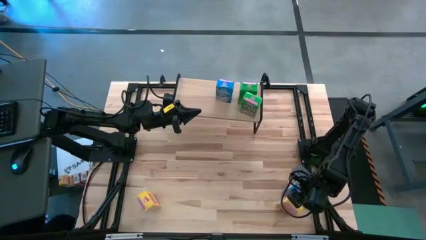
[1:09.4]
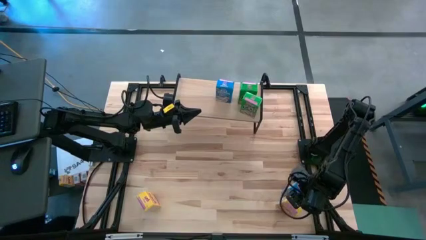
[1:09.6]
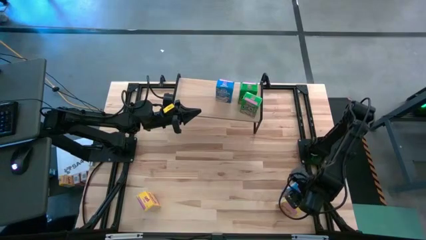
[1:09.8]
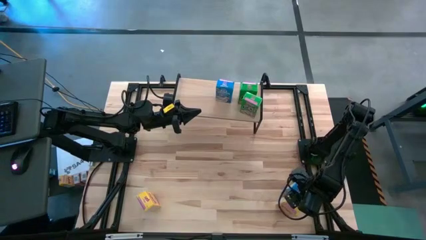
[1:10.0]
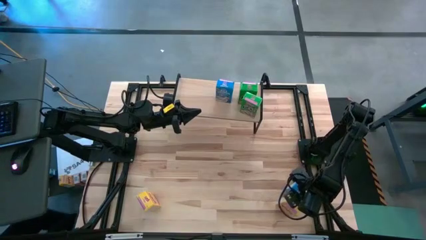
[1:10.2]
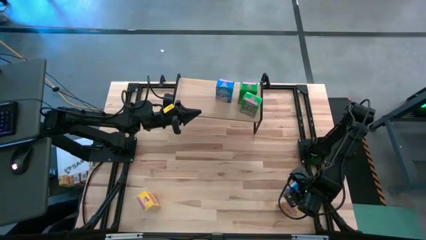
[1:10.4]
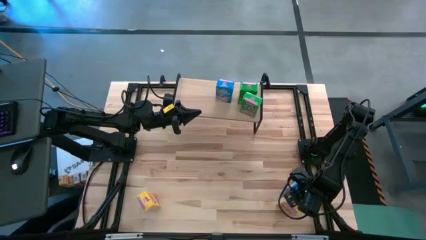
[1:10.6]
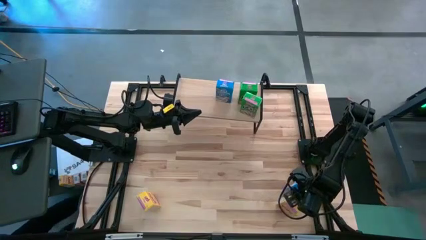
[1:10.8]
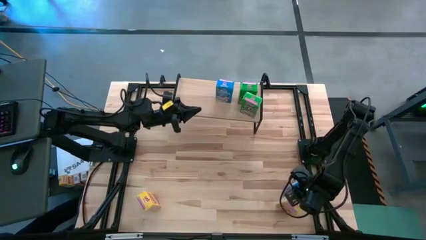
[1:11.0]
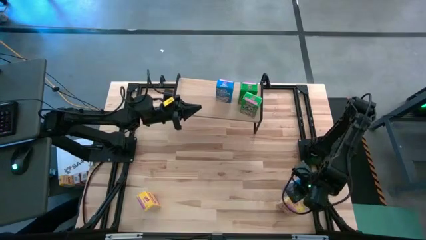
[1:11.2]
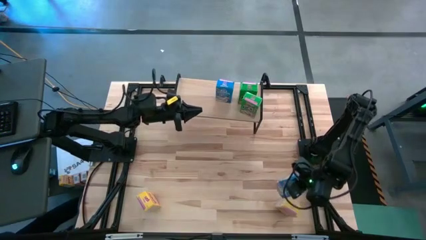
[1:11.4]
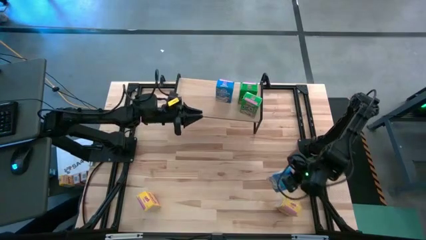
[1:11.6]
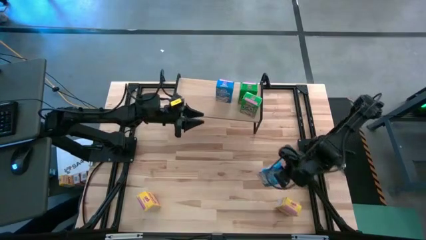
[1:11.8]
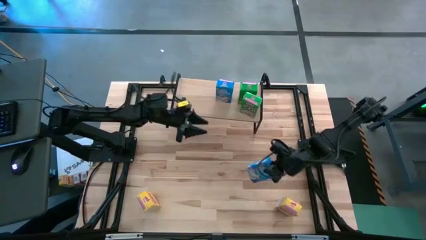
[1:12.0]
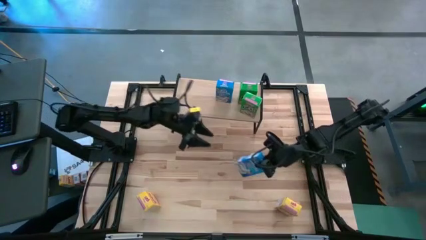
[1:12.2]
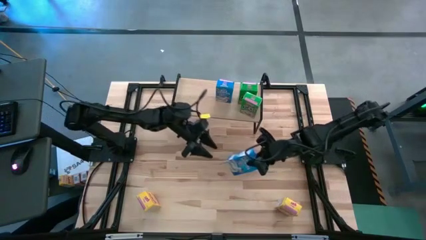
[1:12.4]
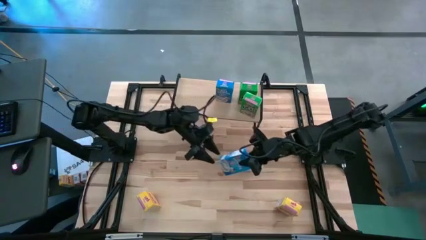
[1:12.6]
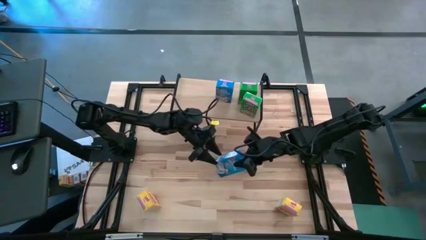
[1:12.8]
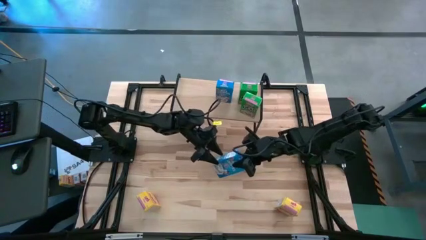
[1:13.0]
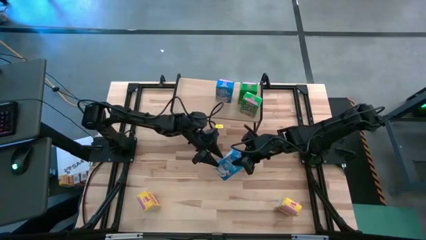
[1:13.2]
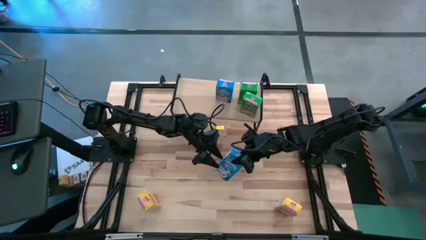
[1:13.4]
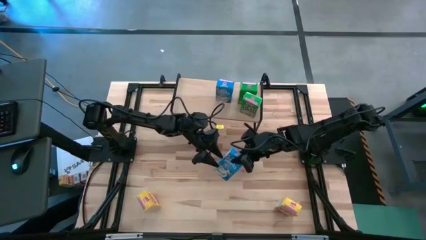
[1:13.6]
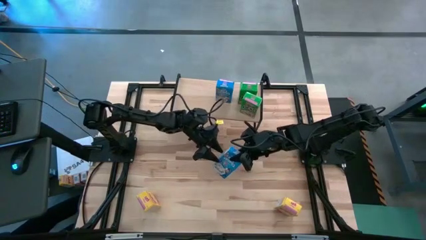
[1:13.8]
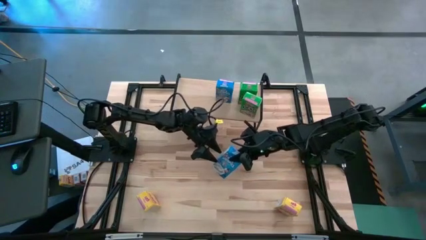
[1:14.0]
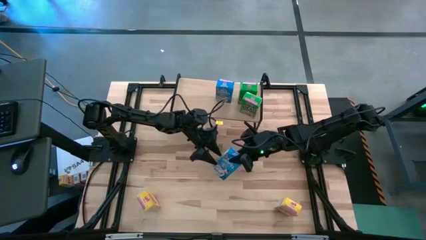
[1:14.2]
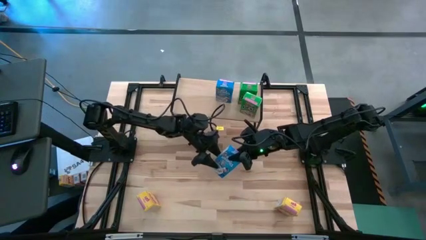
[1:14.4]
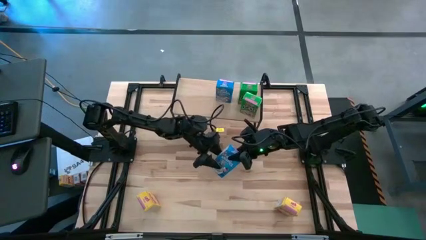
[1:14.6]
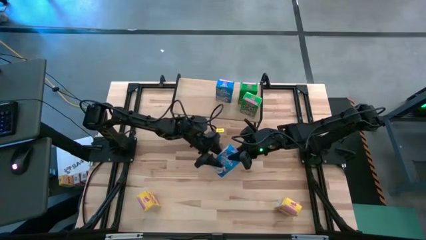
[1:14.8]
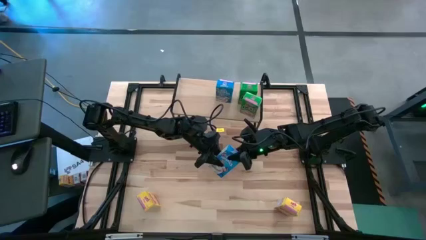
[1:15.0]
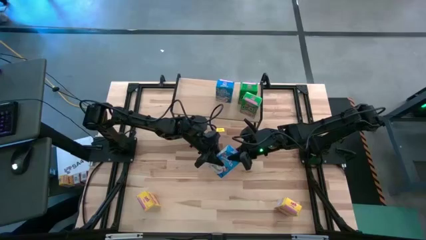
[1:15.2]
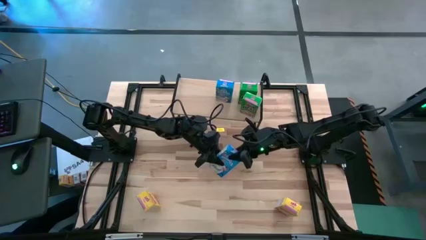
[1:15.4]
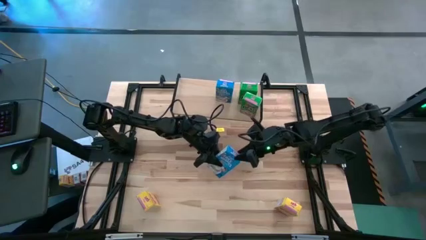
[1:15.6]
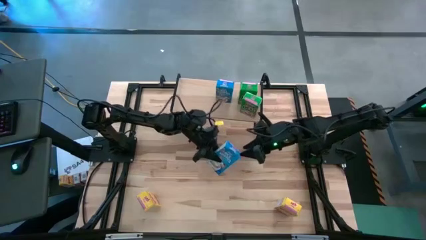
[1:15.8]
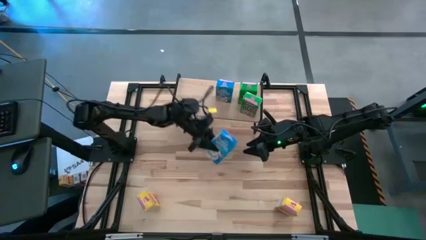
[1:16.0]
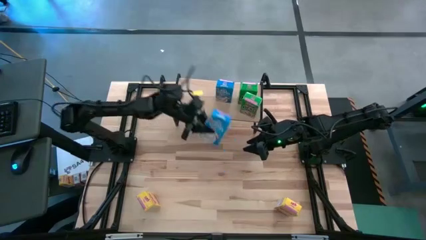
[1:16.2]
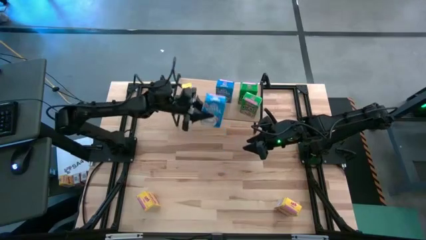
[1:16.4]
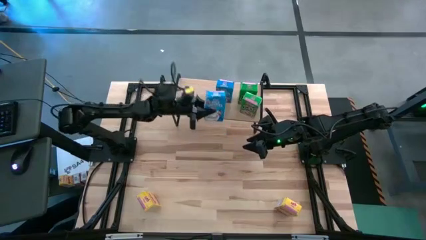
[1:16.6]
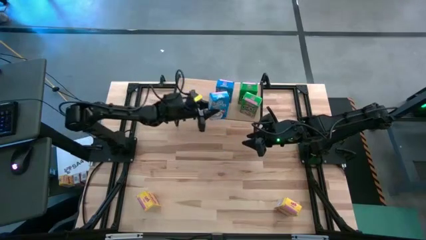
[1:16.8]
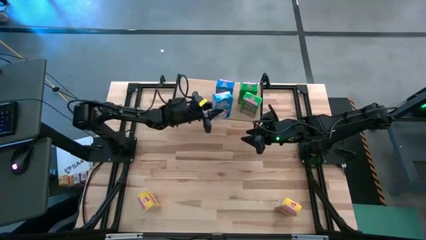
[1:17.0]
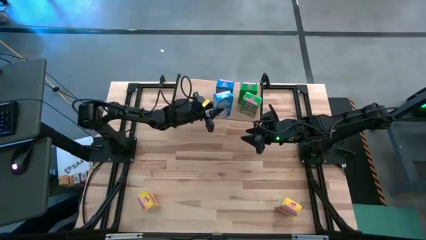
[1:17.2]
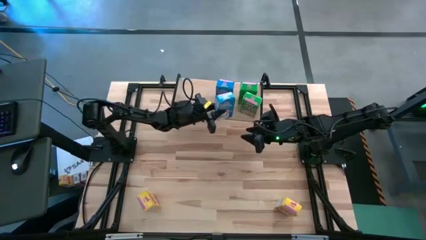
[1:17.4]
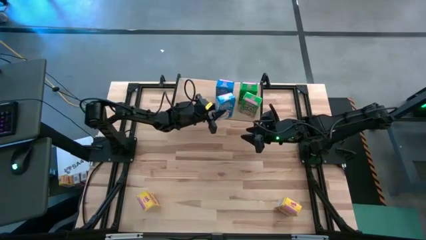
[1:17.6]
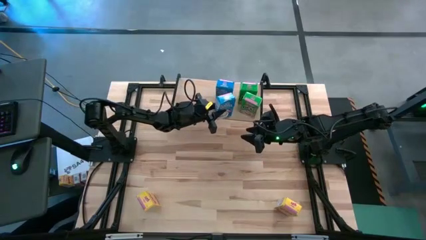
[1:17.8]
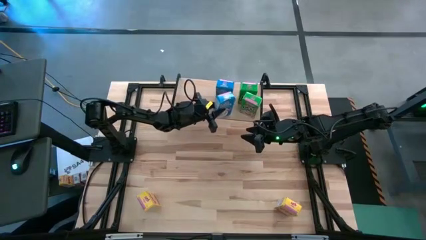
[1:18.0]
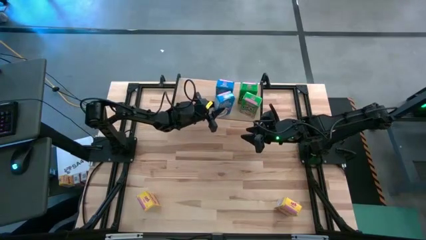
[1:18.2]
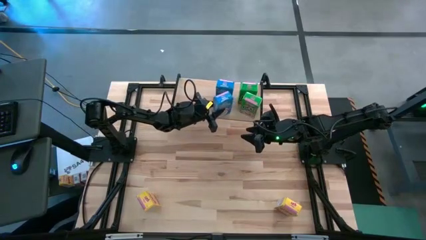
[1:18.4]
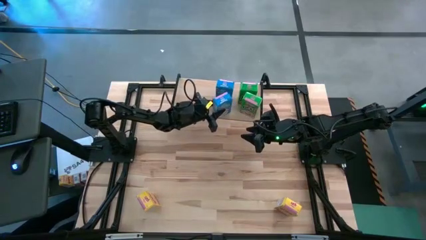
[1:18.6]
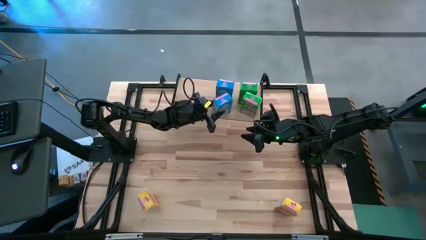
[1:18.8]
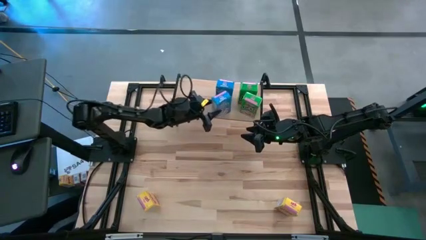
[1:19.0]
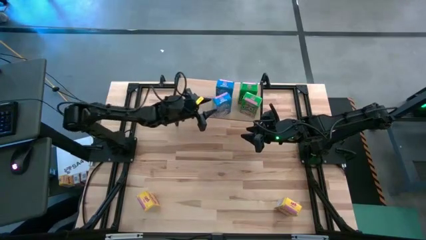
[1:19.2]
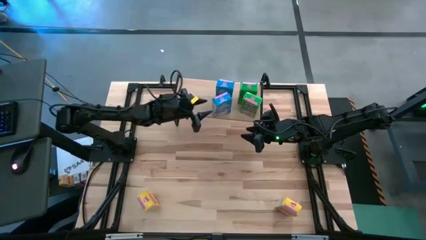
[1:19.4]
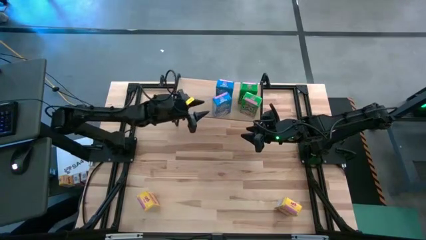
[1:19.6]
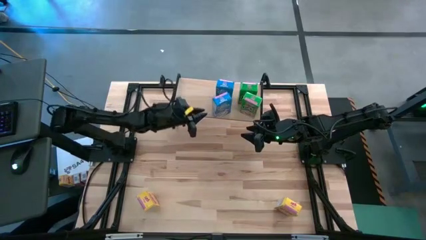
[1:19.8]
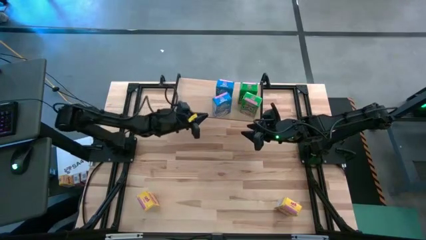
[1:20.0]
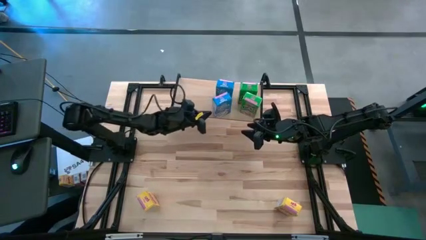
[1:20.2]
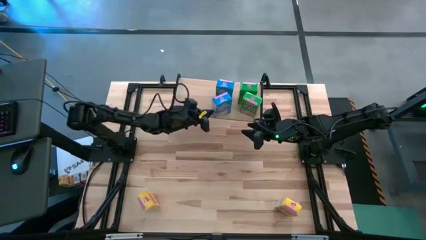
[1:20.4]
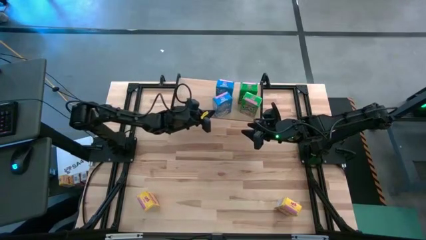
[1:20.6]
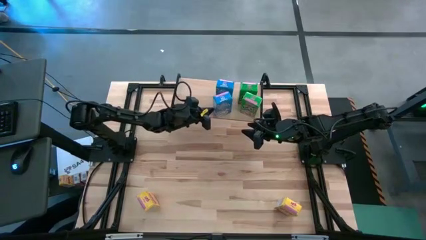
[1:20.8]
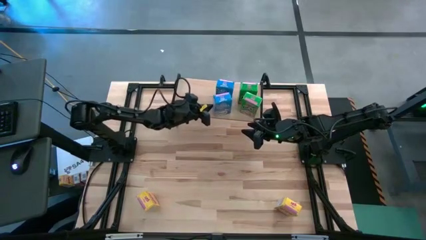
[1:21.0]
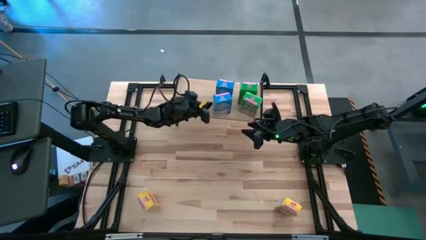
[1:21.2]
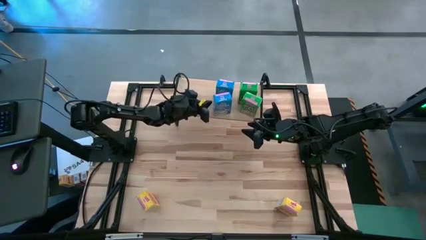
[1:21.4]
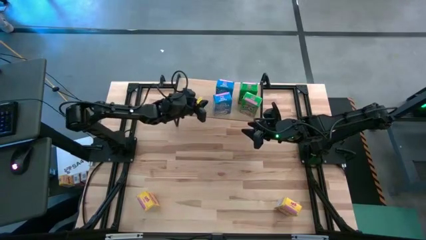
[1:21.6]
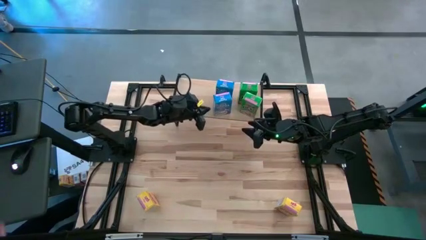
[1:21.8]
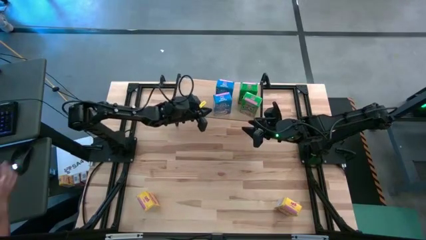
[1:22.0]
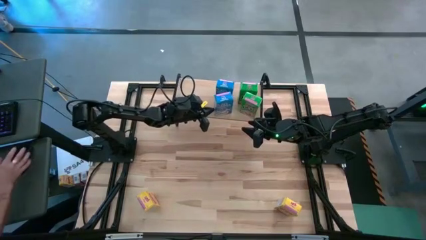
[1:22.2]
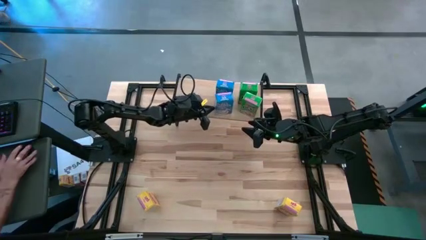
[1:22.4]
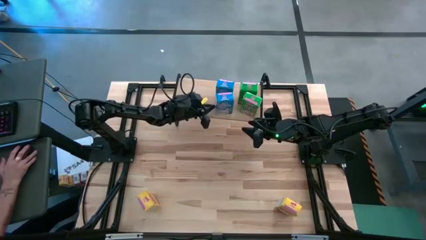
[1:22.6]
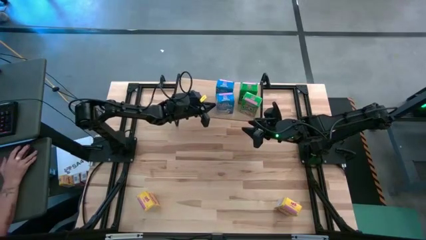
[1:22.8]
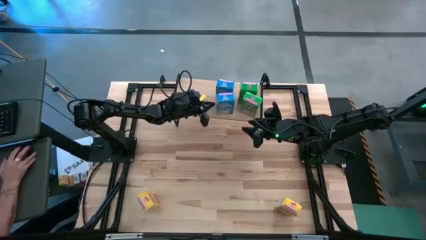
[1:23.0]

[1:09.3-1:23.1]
Task: Stack cereal on shelf
Put the blue cereal box on the shelf aligned with the other blue cereal box
